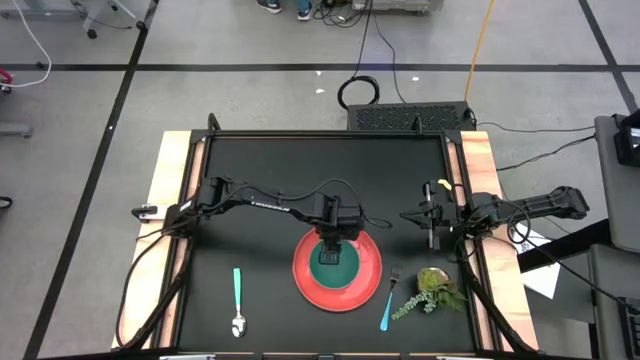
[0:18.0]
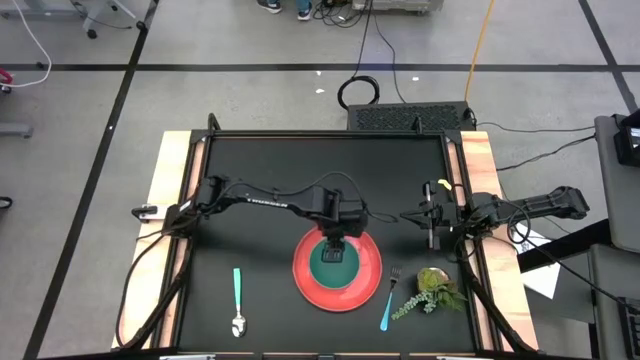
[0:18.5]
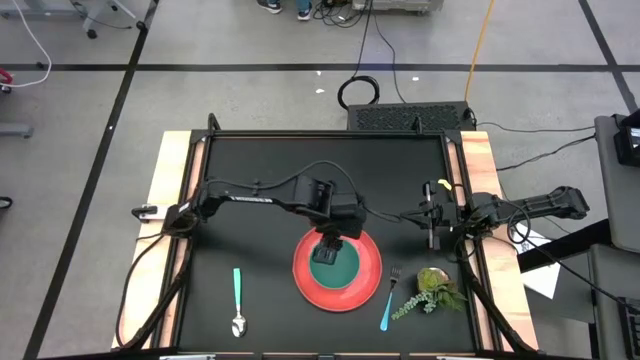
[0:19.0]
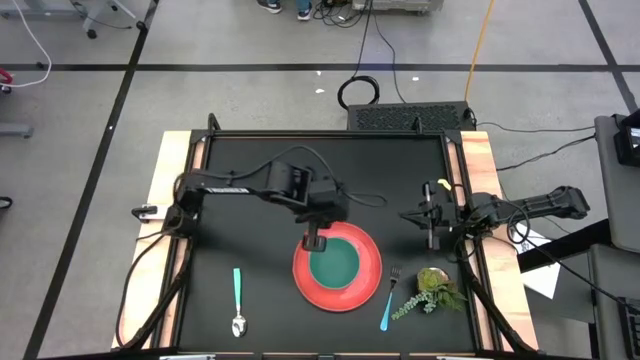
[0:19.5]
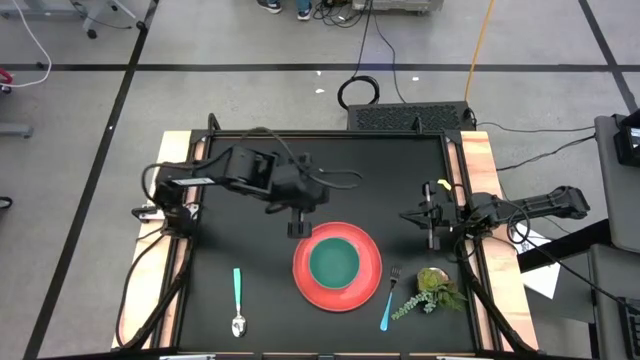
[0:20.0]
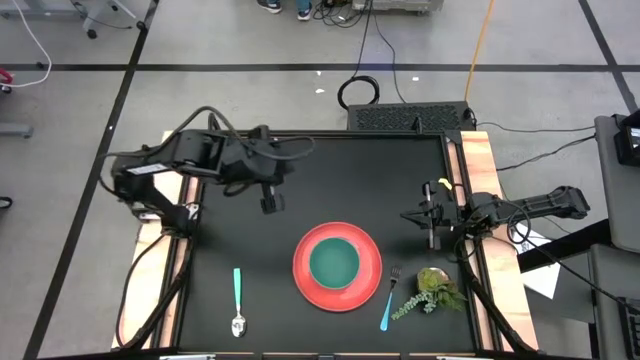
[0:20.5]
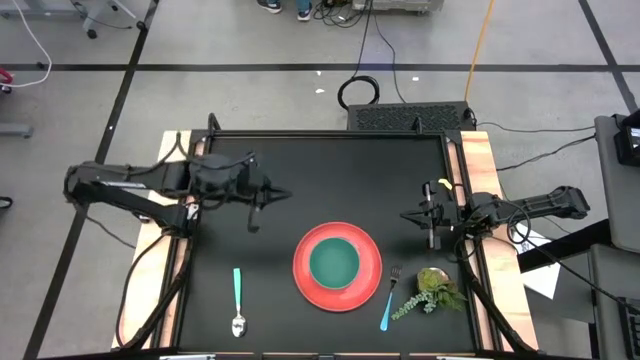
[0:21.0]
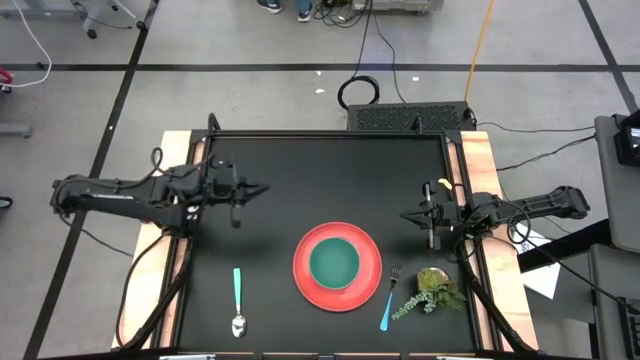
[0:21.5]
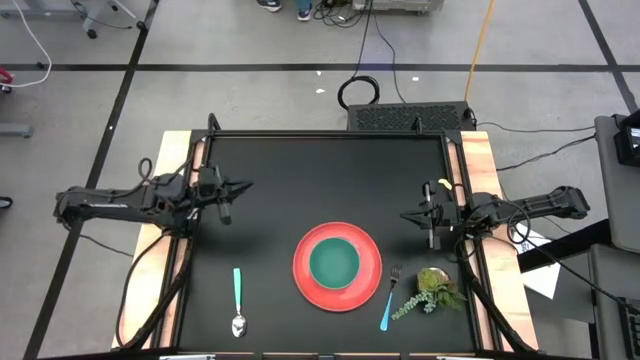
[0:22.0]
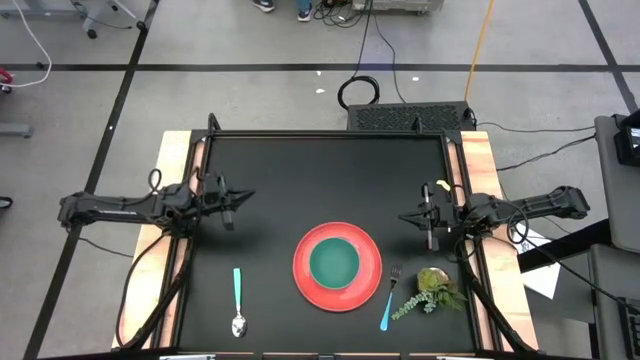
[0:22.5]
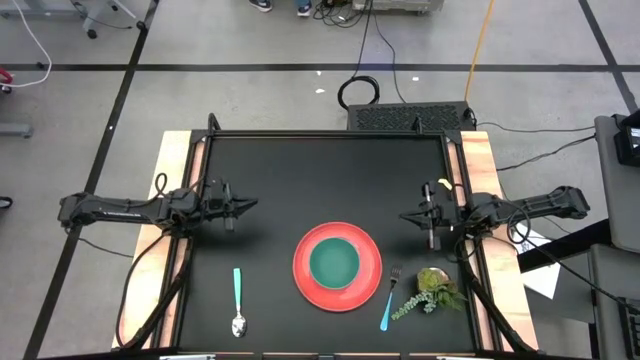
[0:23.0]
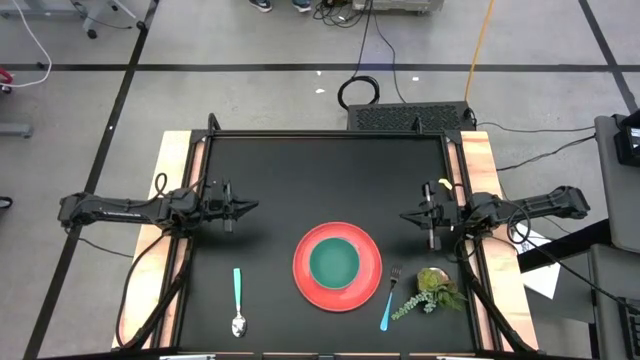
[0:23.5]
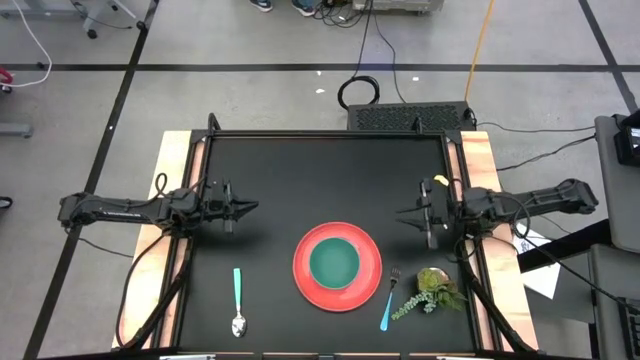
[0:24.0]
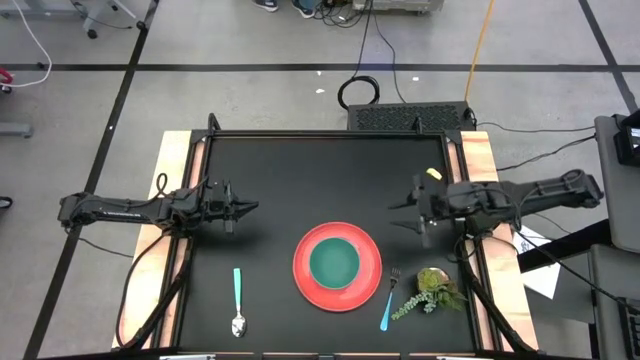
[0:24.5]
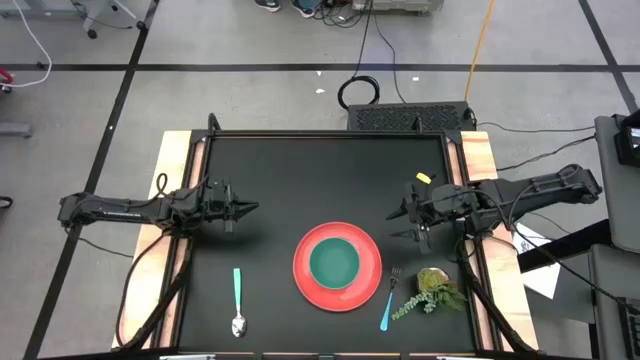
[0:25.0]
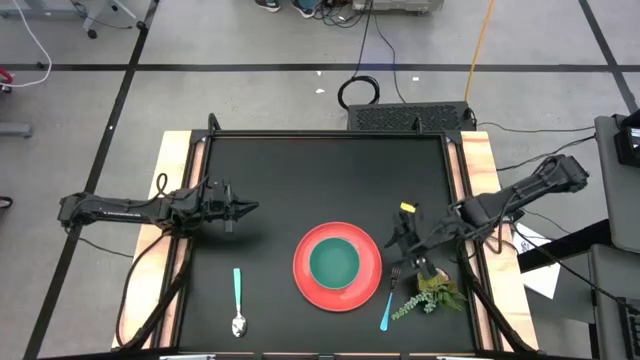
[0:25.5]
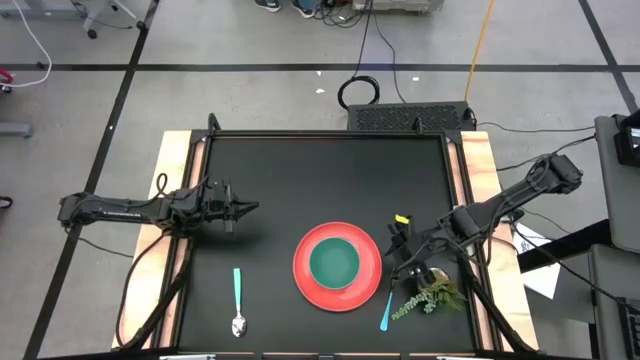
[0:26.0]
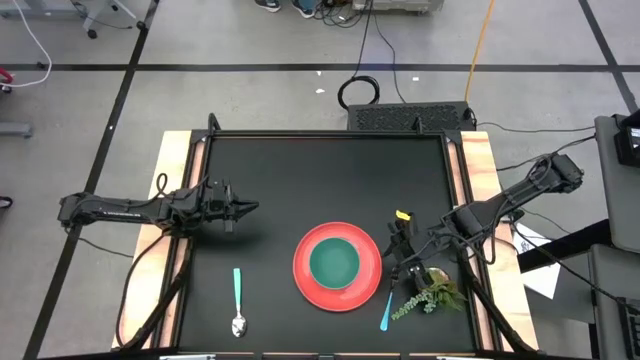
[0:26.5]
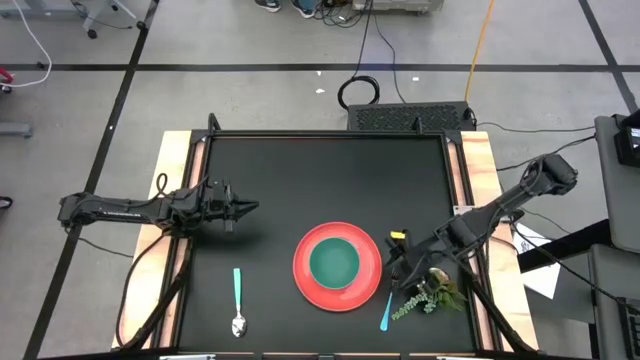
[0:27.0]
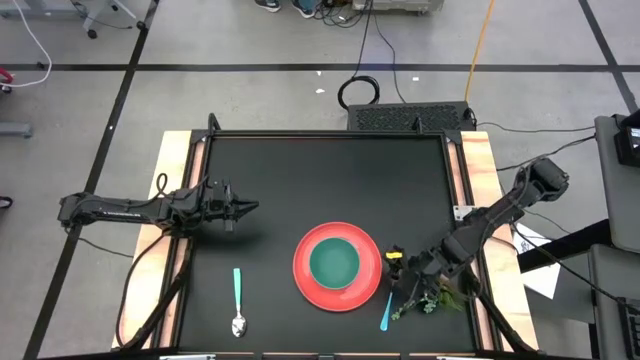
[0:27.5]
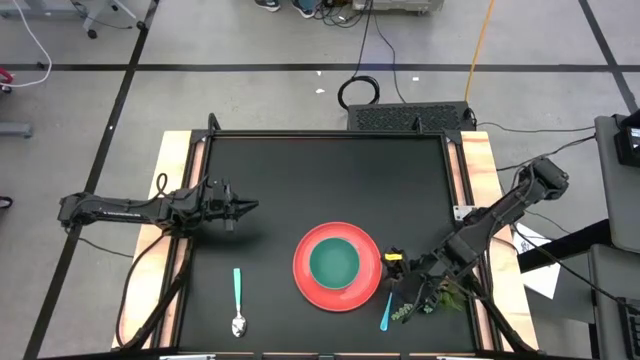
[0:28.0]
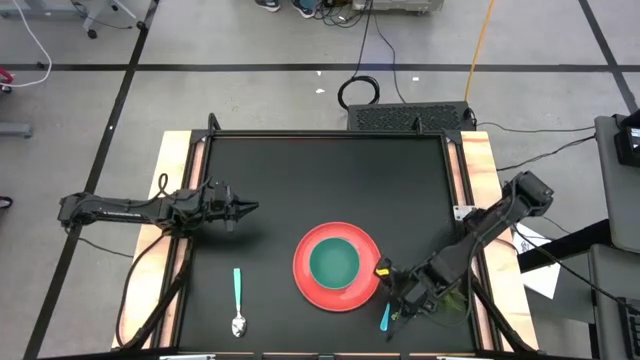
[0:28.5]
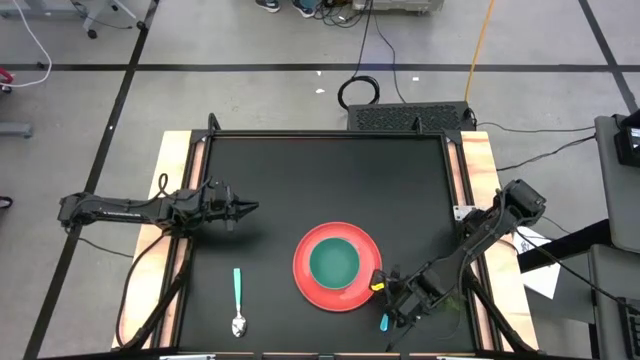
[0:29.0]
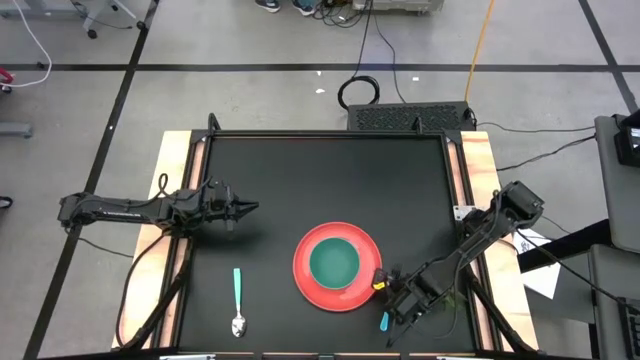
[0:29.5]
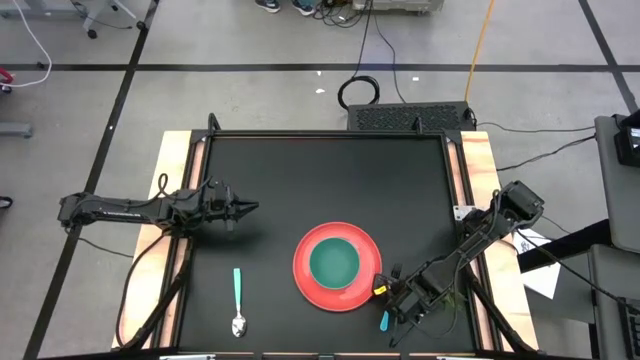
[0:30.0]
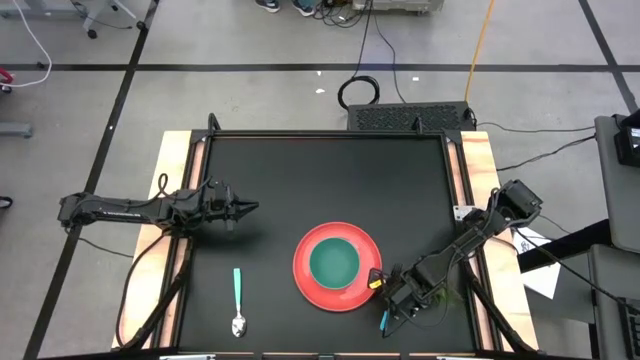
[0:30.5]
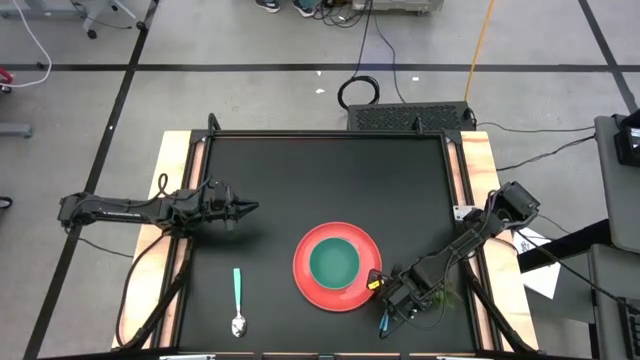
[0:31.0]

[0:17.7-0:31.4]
Task: Set table place
Put the blue fork on the orange plate to the right of the green bowl

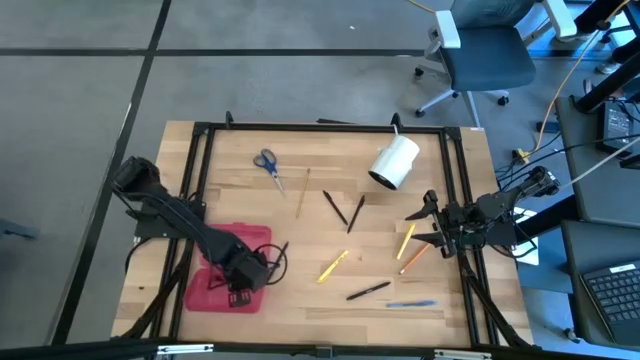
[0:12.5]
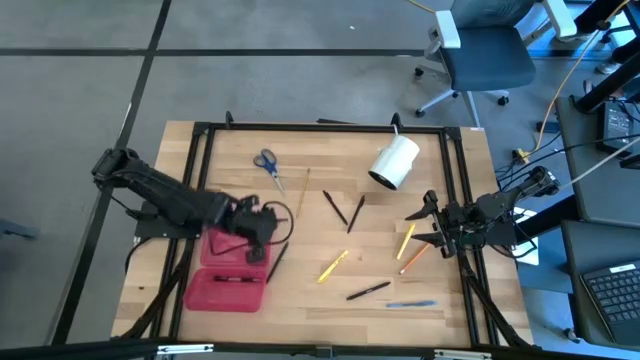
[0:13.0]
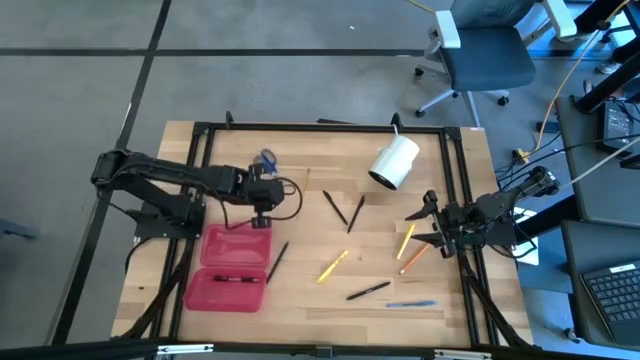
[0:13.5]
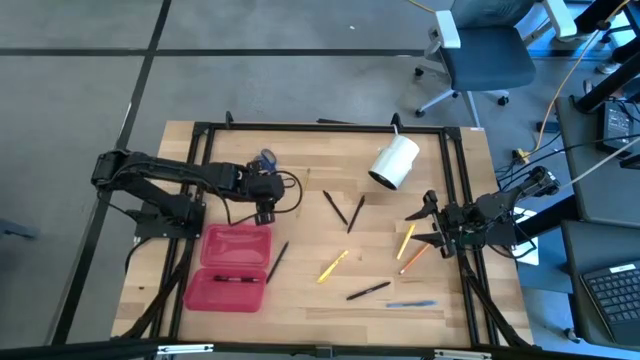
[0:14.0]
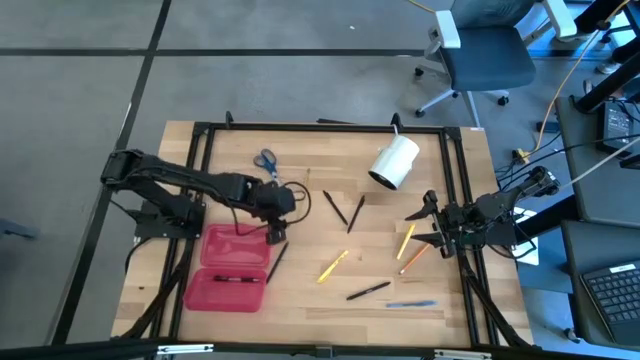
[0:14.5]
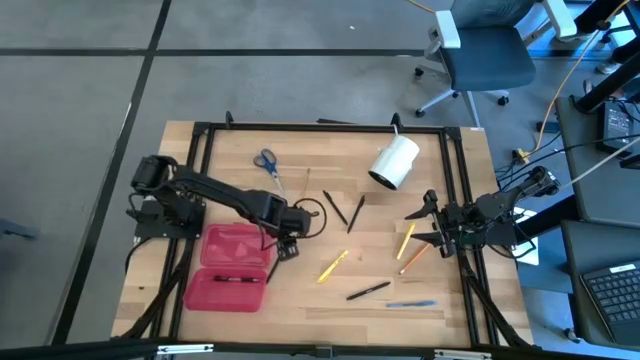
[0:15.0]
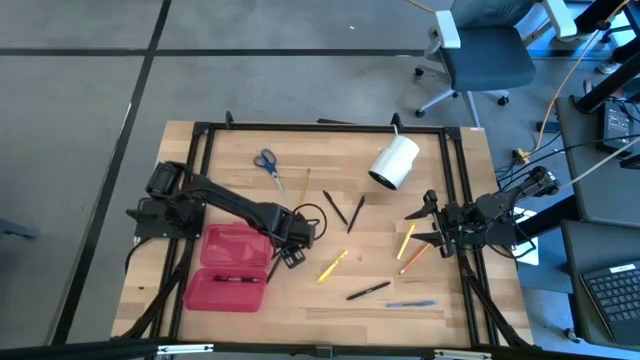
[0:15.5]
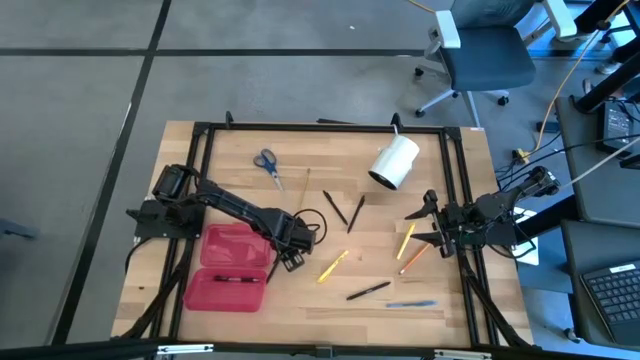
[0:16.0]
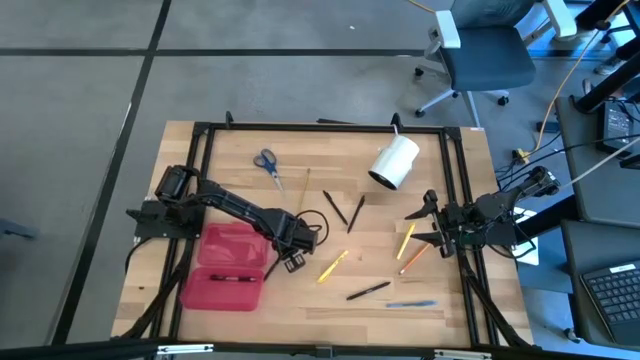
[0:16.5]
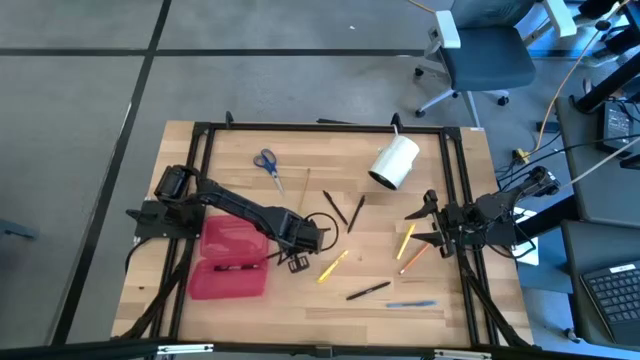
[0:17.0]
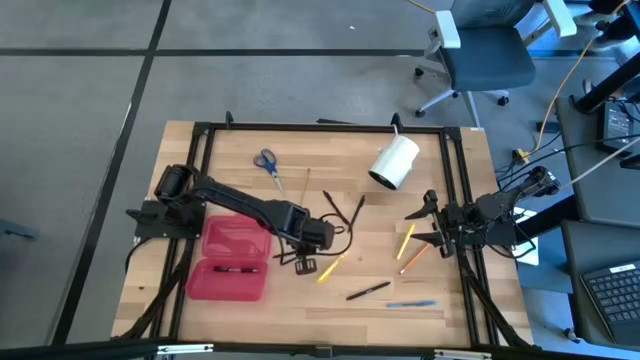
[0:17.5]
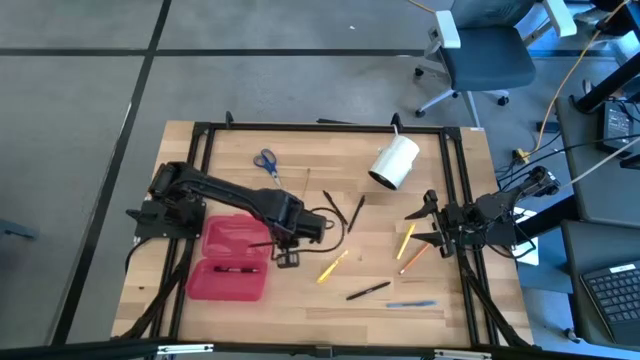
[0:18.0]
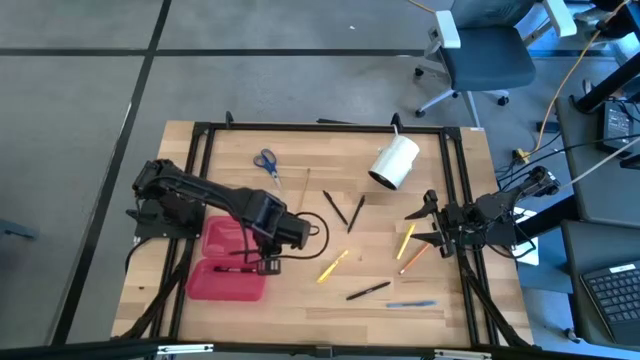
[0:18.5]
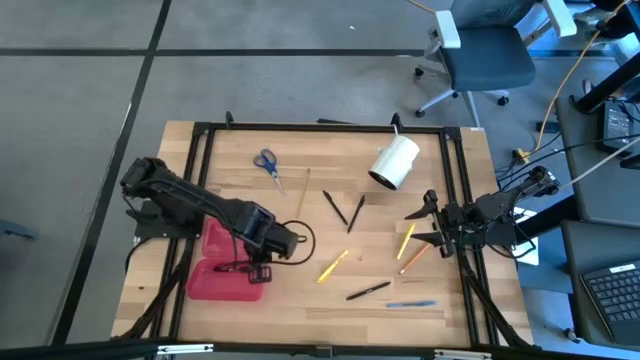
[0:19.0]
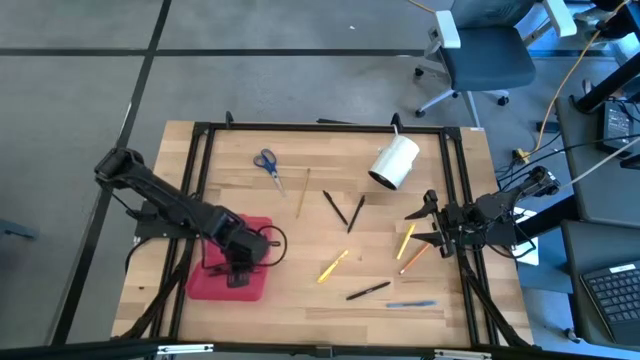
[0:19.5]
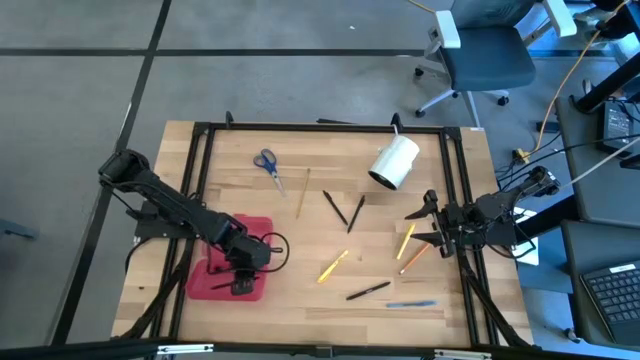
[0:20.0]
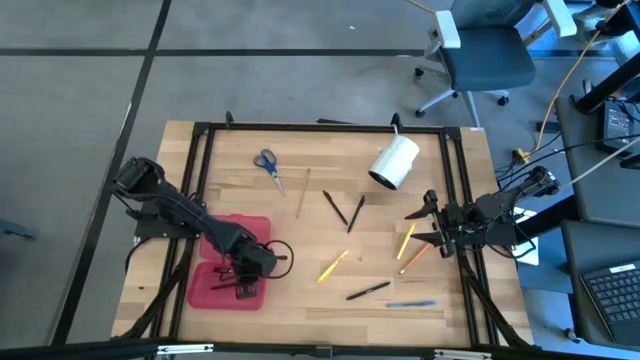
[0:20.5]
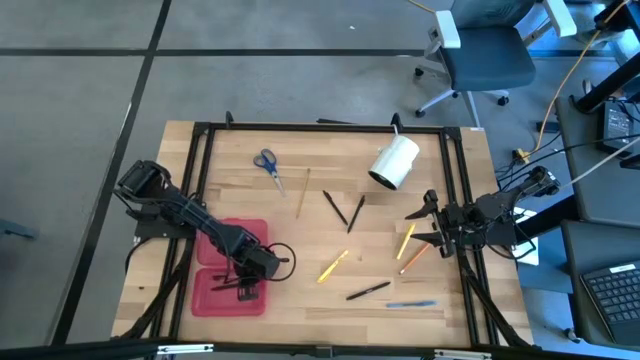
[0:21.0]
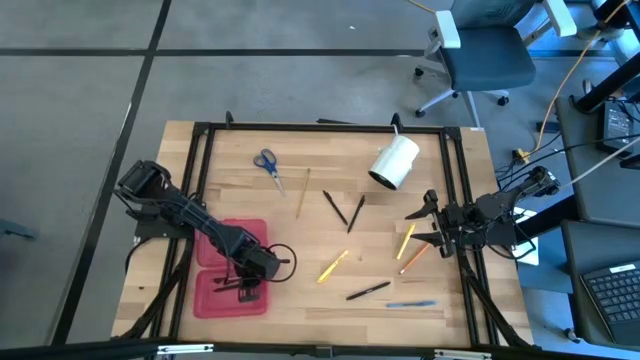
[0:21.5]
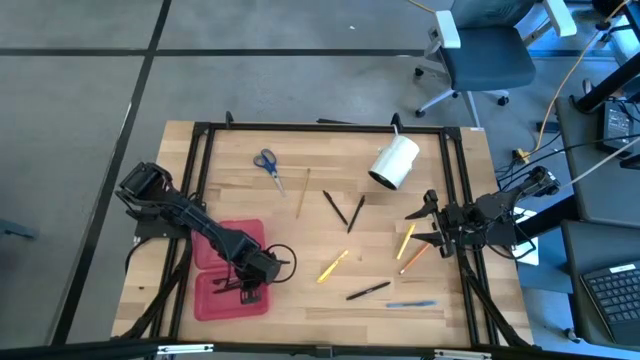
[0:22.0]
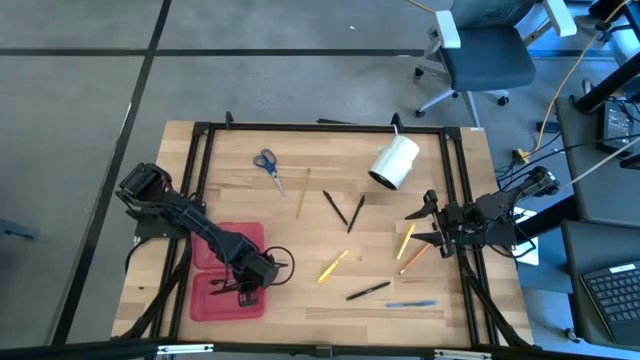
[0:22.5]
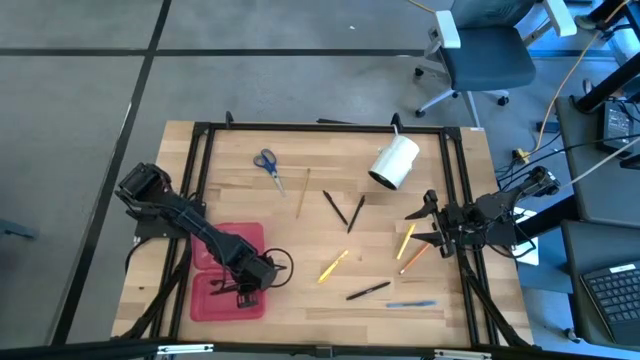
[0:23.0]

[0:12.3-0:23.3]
Task: Pick & place school supplies into a supply box
Put the black pen into the red supply box
